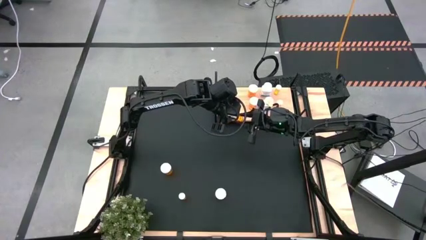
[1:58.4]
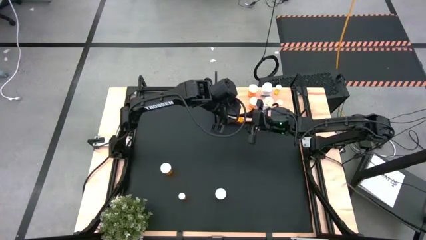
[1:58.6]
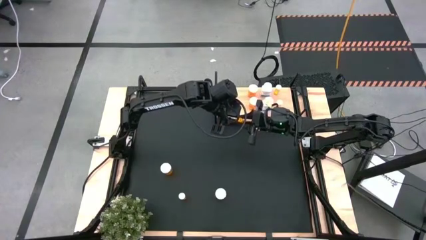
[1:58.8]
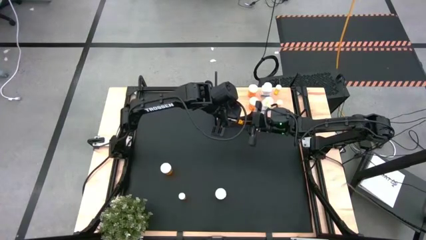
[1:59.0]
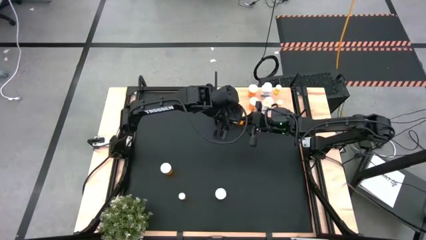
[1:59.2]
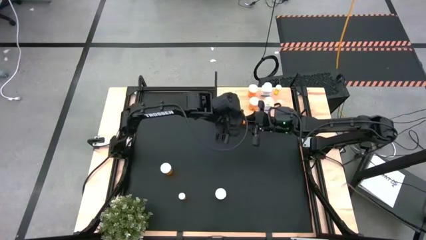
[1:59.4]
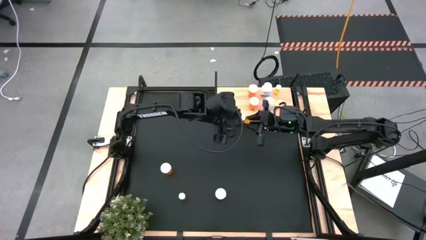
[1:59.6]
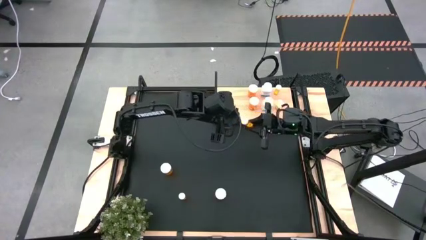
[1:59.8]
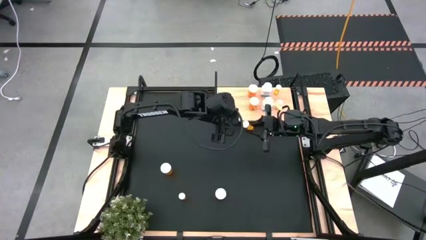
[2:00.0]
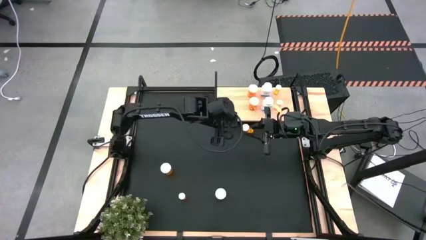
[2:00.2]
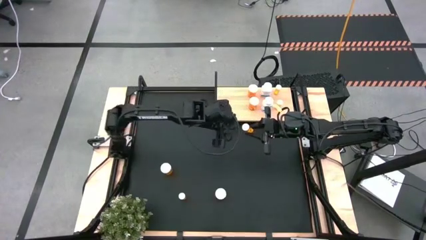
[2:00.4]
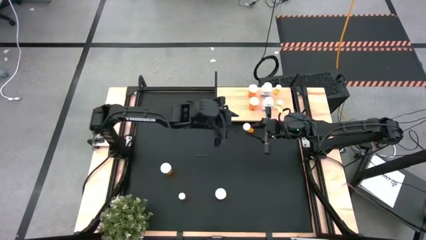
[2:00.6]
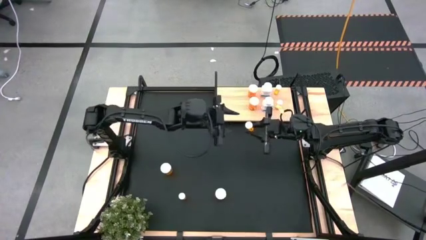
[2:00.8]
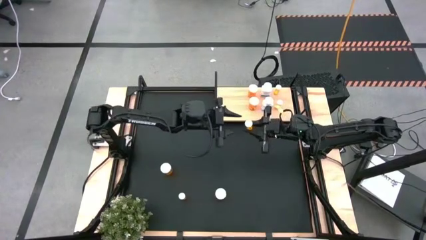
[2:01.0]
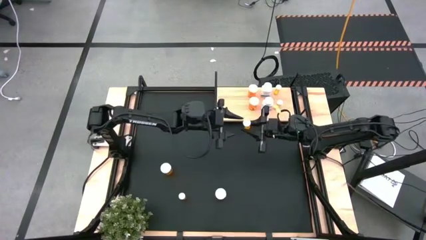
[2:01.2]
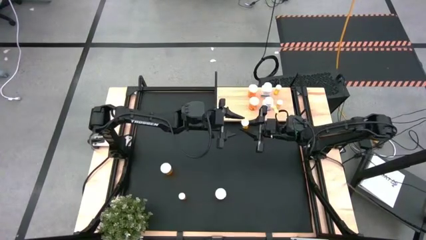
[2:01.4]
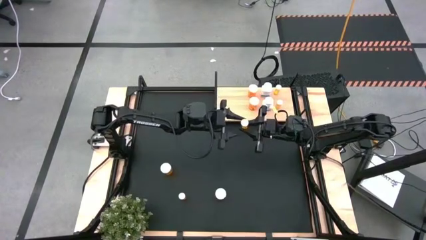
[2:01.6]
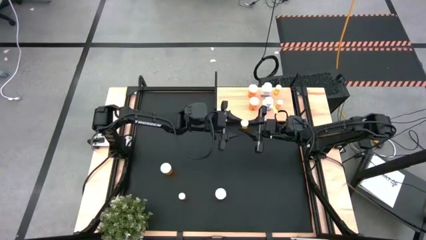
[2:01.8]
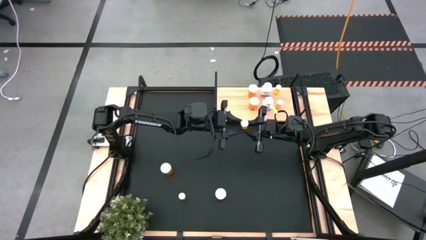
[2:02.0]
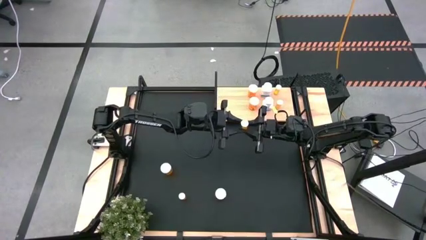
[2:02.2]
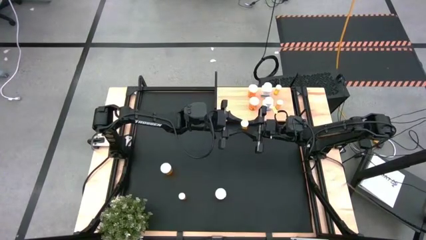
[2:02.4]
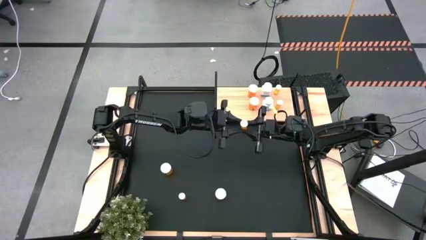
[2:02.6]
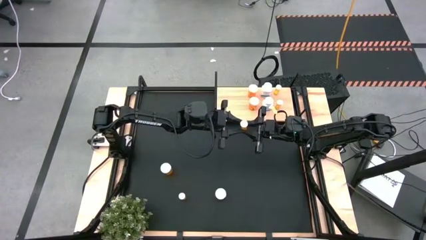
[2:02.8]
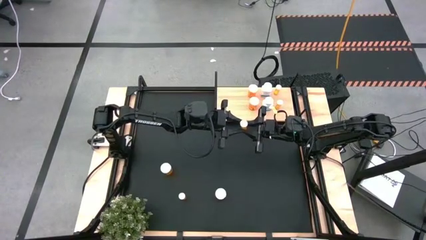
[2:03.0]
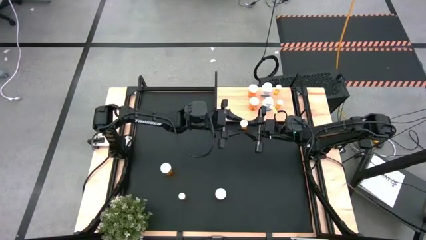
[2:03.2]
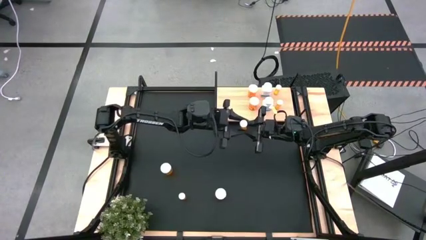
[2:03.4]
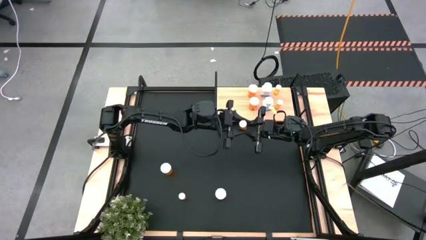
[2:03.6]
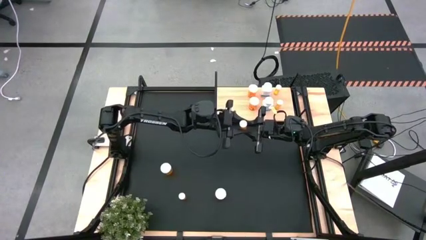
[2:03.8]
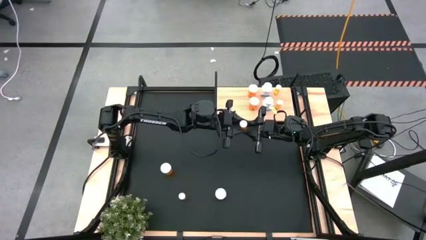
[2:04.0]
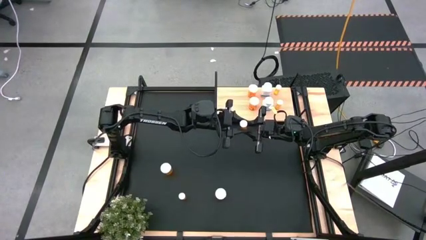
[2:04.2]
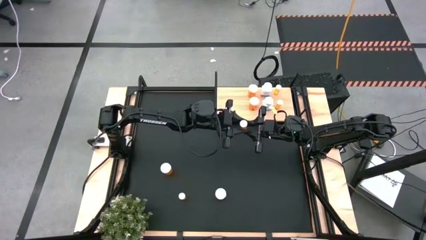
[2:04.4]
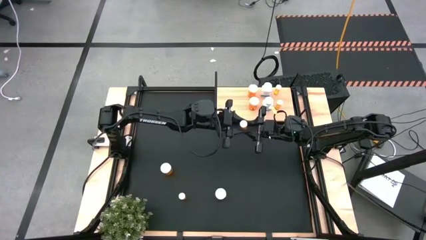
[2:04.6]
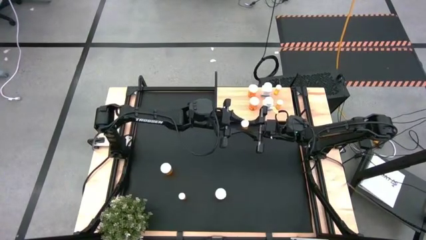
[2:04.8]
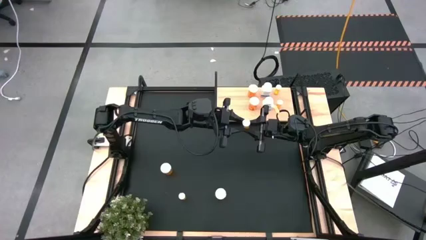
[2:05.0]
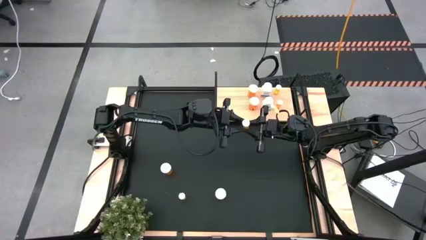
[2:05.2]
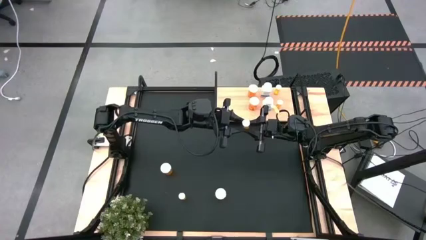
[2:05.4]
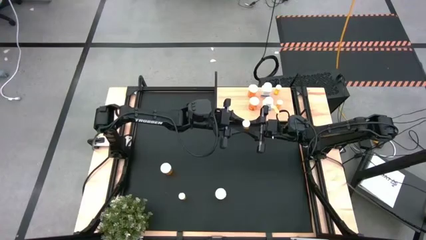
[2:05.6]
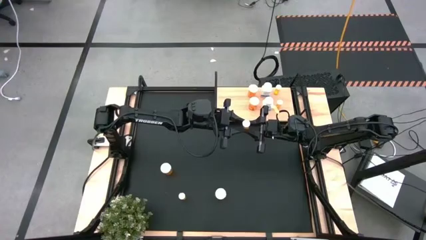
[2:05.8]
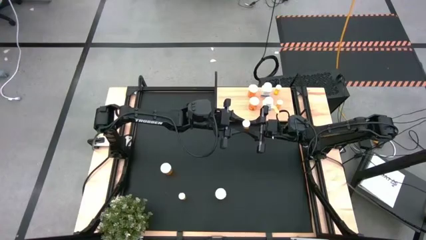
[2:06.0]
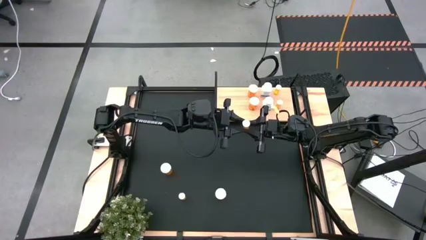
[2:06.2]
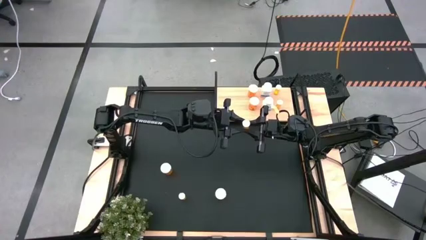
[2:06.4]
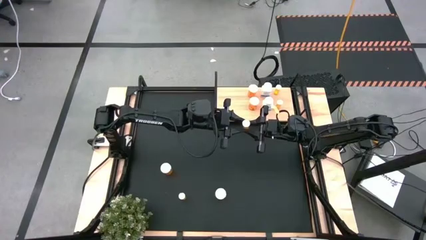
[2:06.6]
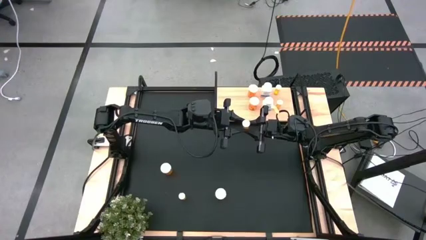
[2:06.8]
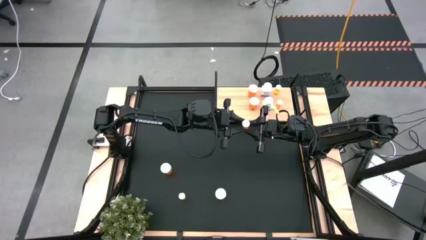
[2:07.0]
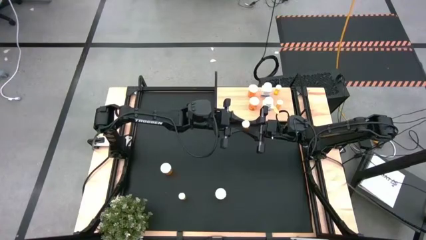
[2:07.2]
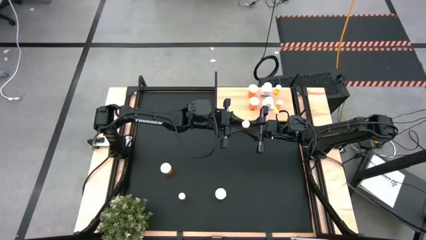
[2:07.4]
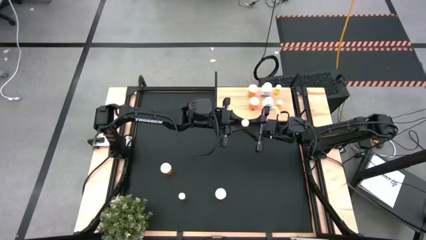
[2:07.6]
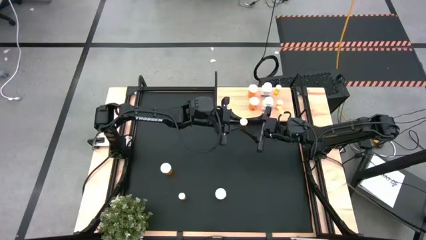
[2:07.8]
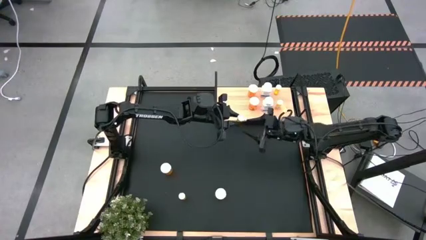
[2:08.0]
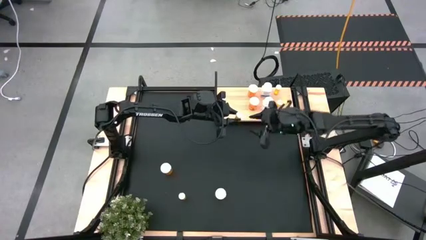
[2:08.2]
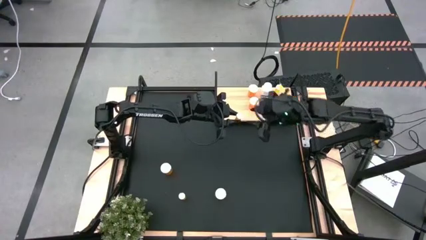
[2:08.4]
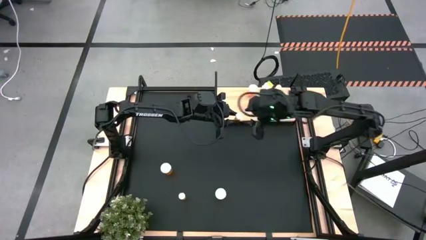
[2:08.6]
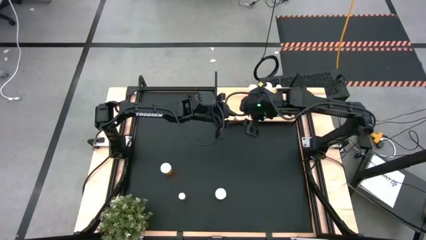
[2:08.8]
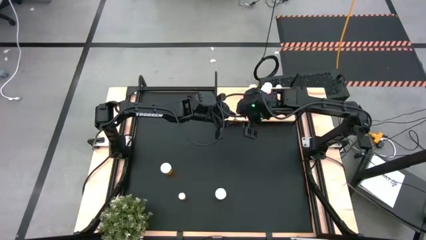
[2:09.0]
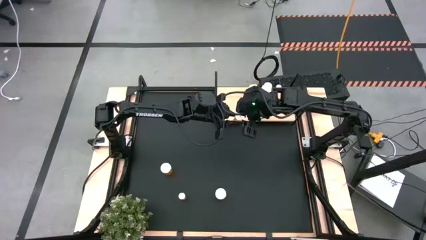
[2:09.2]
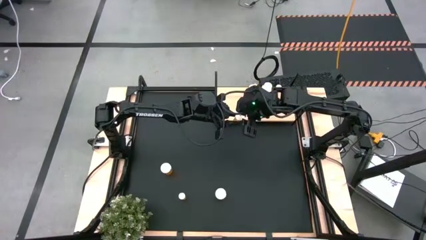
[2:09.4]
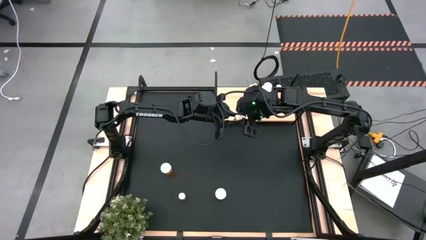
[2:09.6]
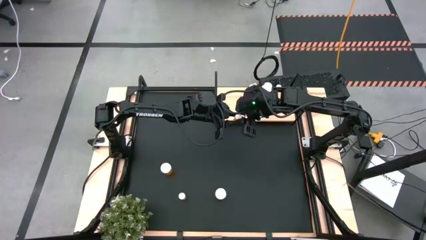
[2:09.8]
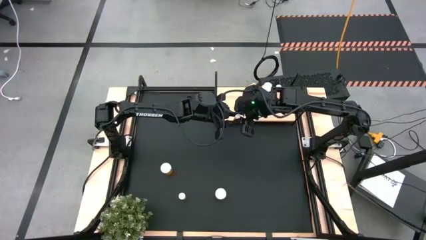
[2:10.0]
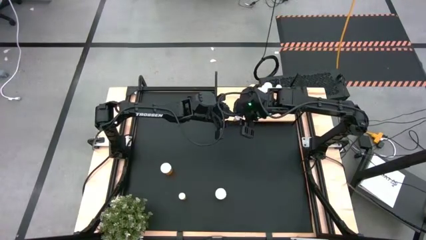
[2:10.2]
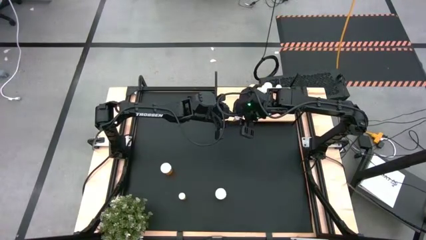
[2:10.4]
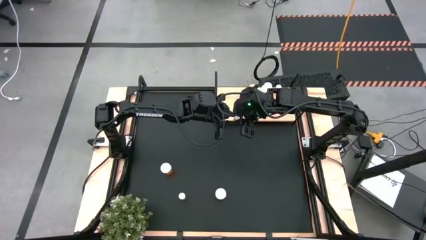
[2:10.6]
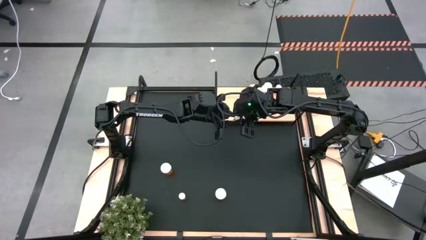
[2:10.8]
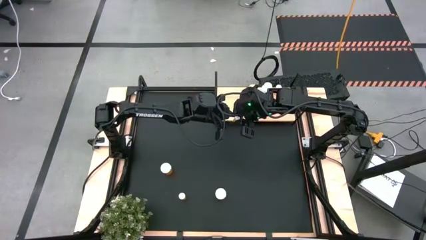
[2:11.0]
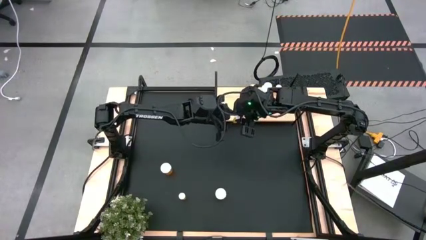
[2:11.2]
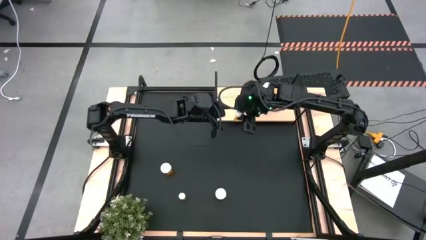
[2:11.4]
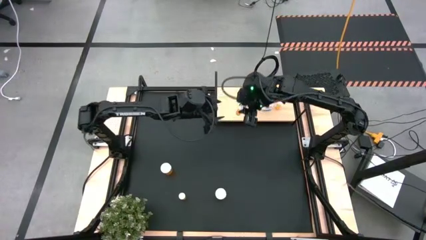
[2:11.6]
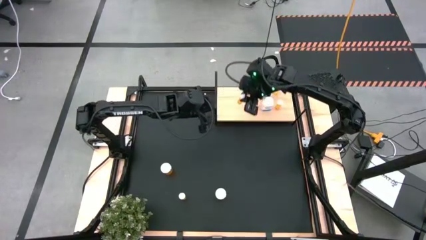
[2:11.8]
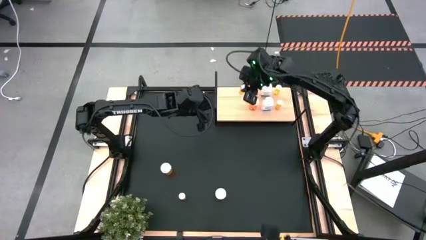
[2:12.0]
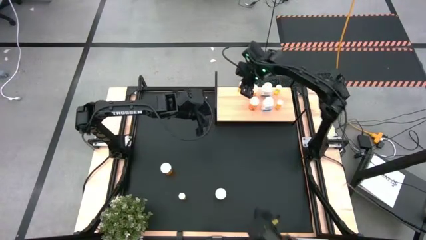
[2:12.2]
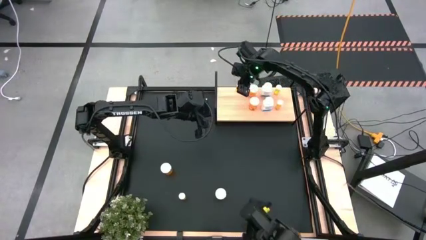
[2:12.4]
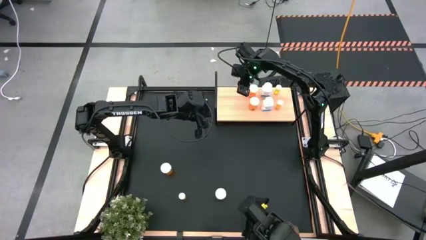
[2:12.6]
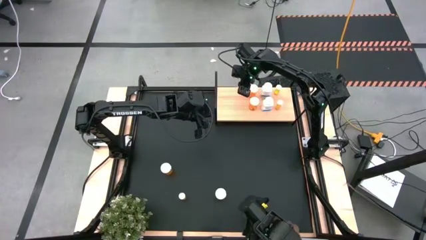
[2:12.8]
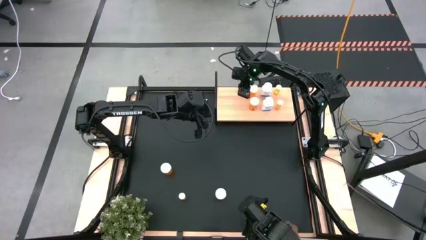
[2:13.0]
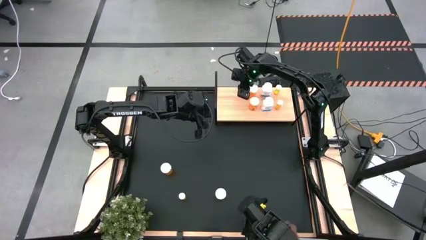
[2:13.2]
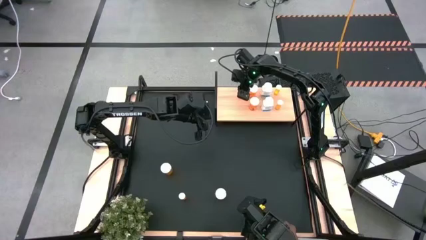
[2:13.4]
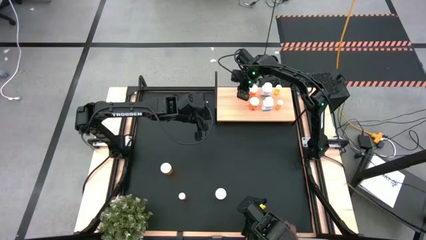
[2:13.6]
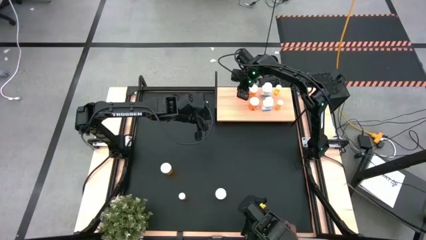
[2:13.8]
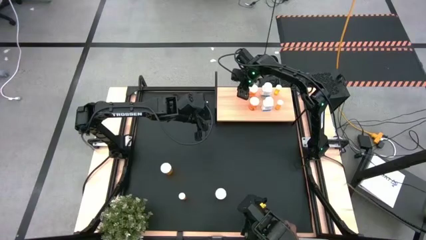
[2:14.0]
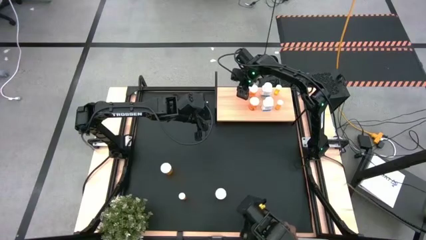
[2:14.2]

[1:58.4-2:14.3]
Task: Pick and place medicine bottles onto shelf by color
Put the small orange pill bottle on the shelf

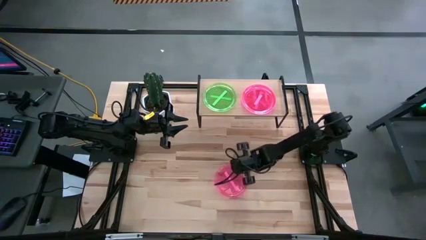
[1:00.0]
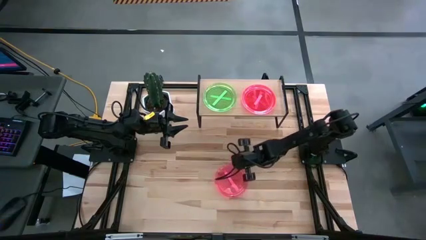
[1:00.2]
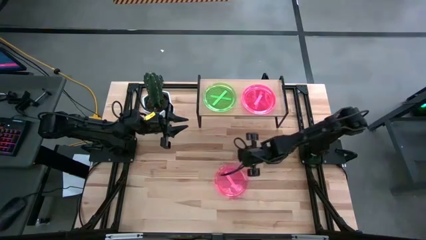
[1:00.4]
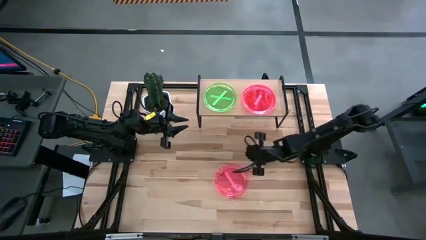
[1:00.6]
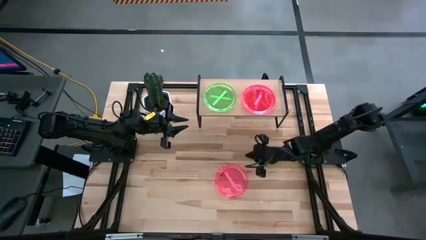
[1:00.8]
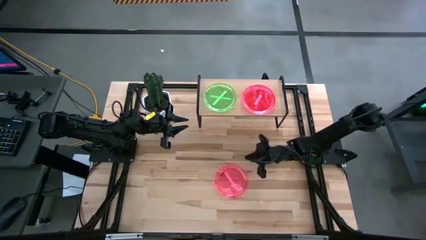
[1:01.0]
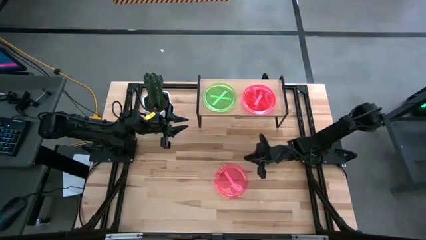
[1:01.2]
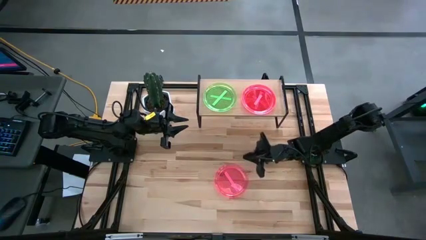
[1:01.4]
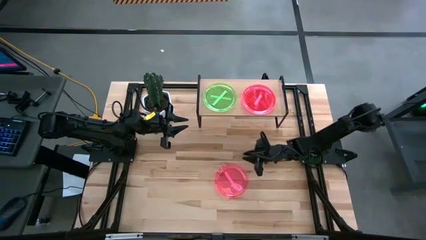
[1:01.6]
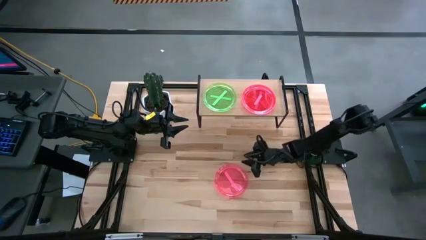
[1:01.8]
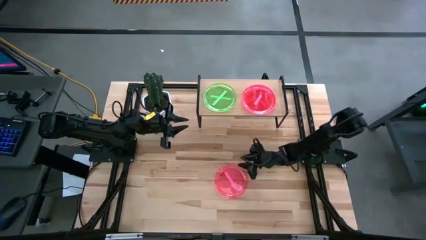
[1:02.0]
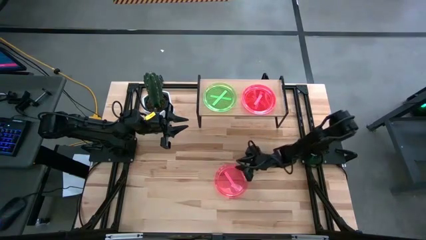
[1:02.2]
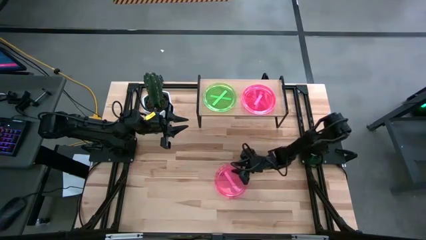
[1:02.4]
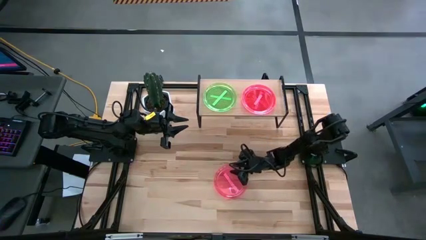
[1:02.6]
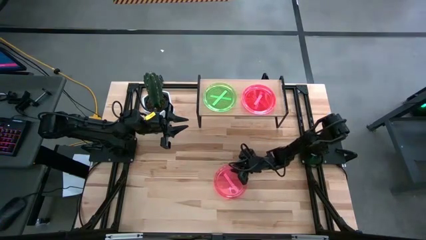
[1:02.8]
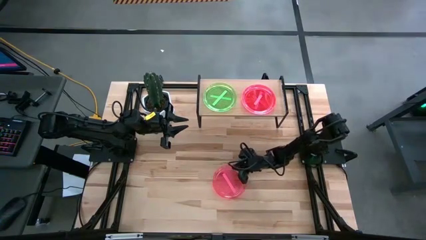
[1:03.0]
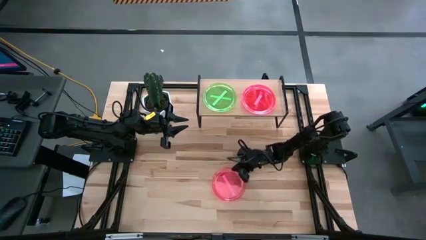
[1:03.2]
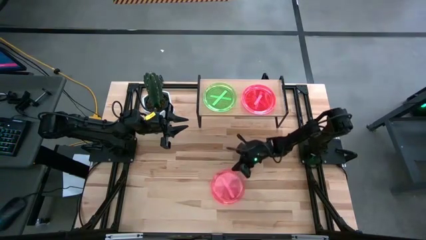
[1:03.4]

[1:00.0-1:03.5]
Task: Place and stack plates onto a shelf
Stack the pink plate on the pink plate on the shelf
